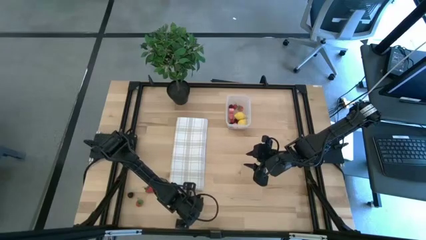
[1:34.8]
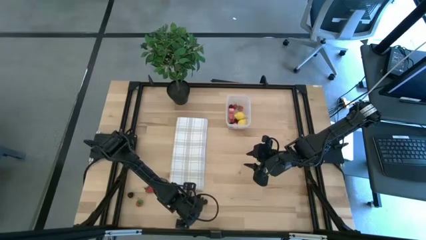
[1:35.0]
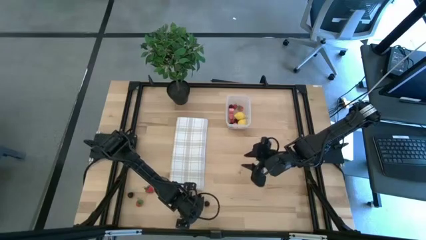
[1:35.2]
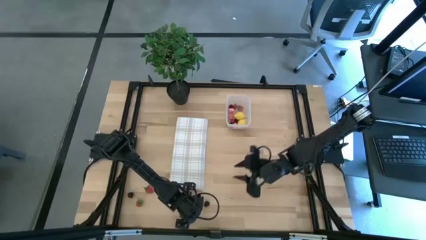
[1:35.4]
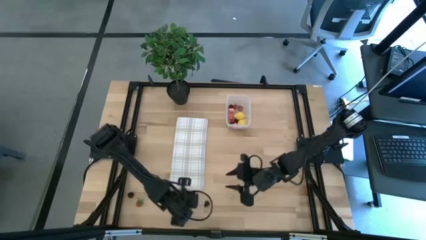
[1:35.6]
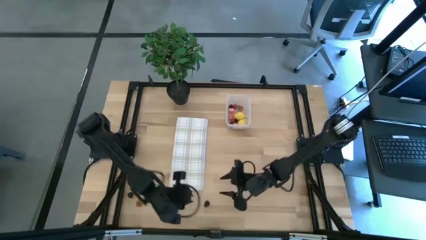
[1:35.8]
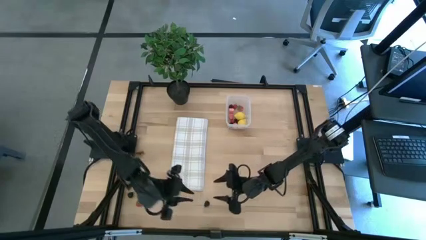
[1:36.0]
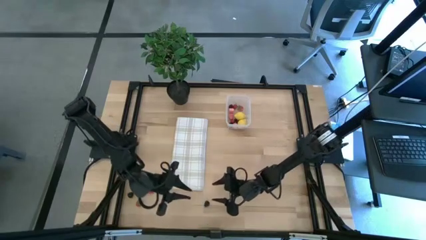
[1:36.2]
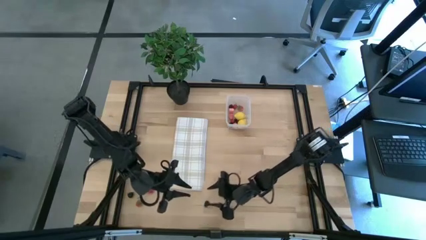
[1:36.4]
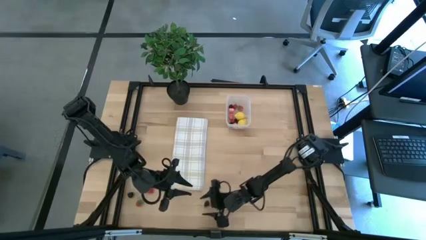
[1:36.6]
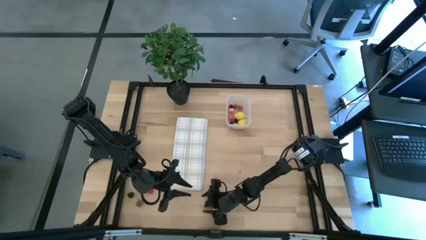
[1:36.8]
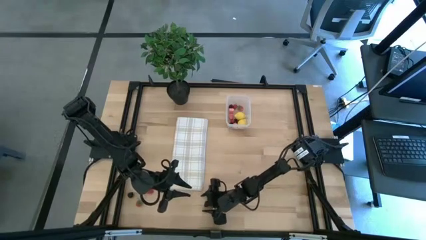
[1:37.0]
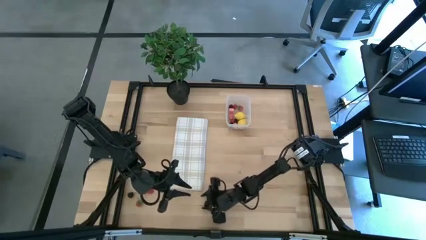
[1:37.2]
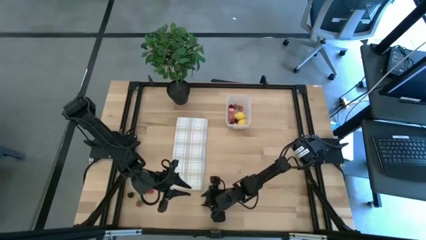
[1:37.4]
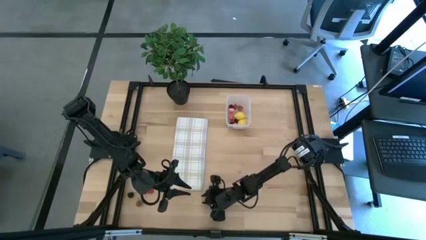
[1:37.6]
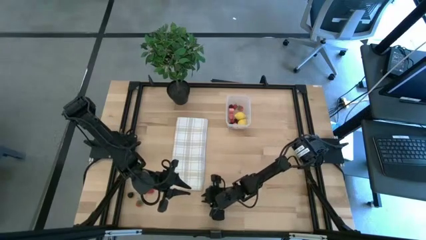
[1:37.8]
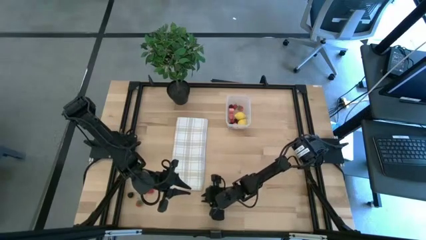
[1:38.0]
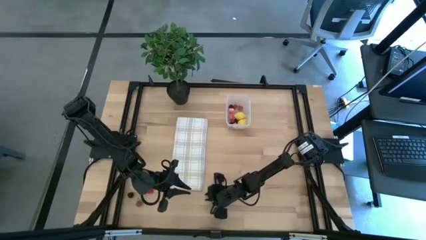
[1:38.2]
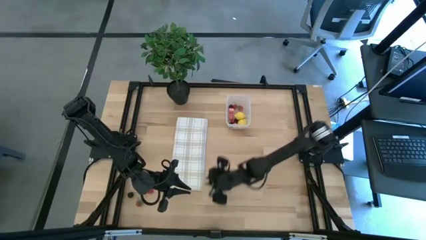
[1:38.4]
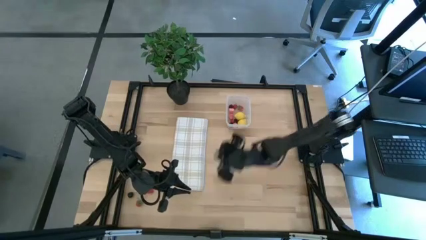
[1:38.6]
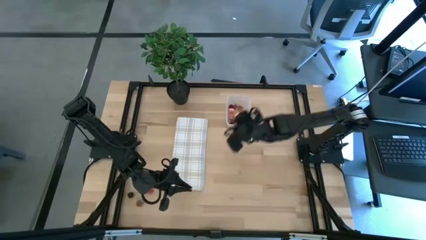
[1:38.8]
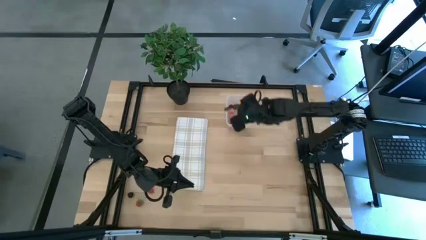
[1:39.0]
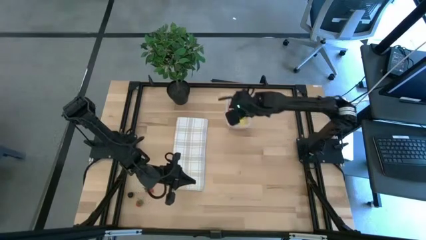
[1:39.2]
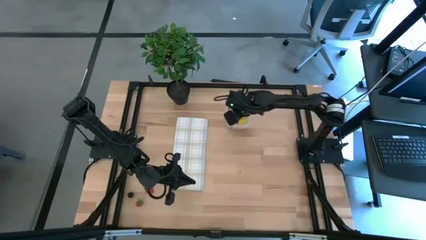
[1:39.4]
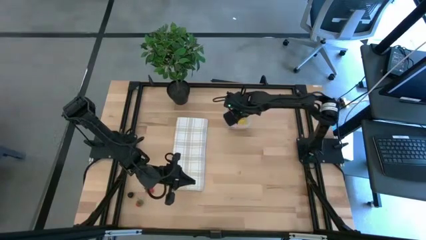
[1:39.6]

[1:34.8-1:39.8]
Task: Pick and placing Produce into tupperware
Put the blackberry into the transparent bin

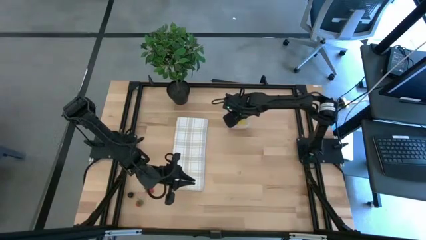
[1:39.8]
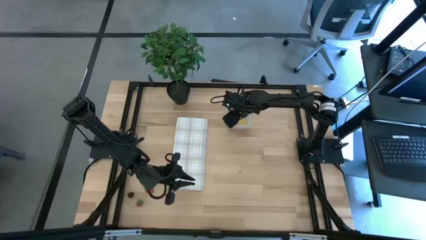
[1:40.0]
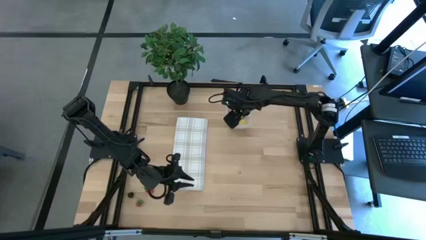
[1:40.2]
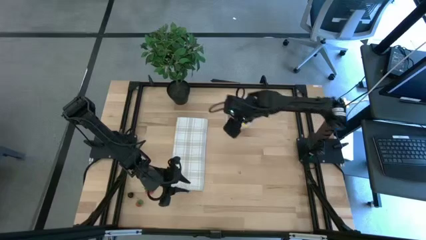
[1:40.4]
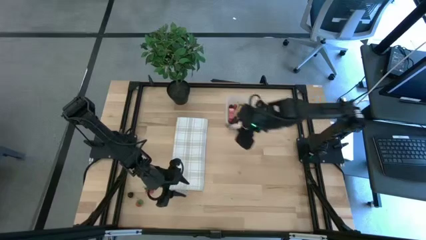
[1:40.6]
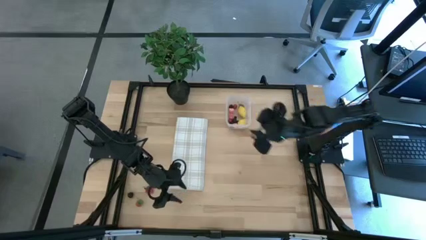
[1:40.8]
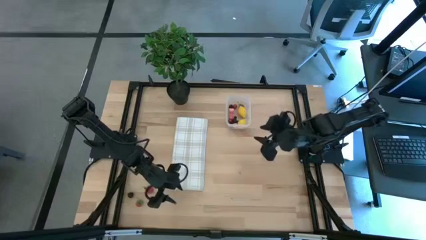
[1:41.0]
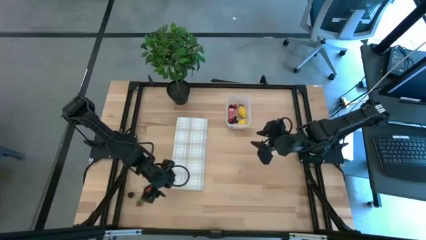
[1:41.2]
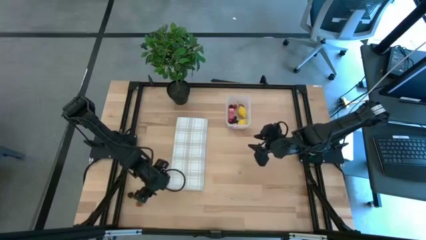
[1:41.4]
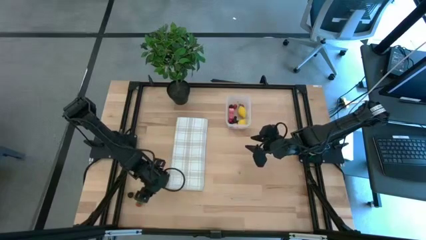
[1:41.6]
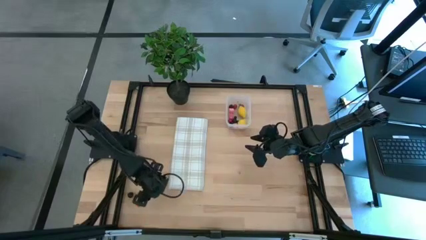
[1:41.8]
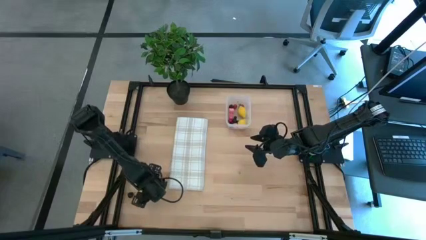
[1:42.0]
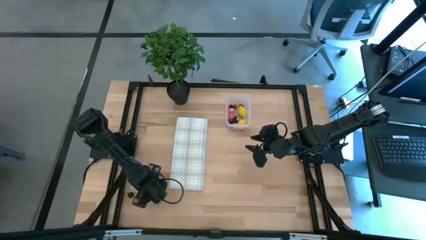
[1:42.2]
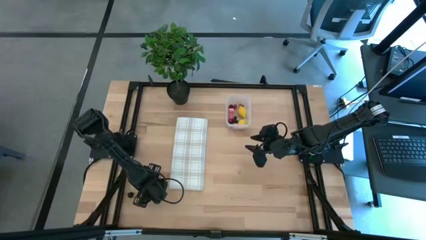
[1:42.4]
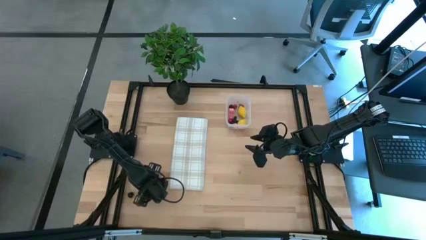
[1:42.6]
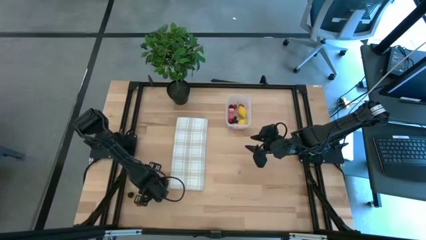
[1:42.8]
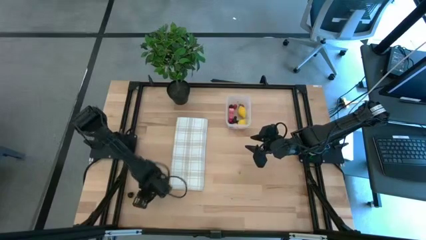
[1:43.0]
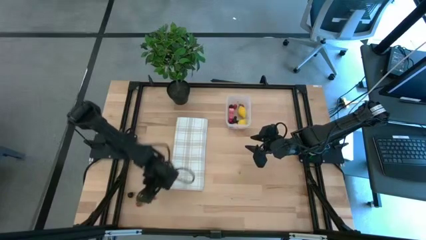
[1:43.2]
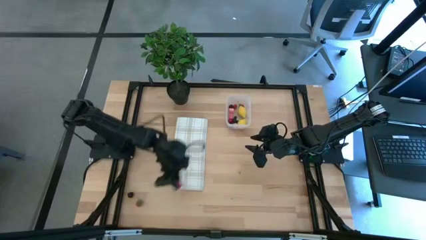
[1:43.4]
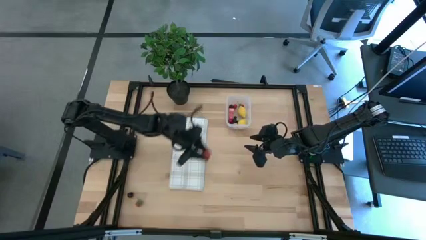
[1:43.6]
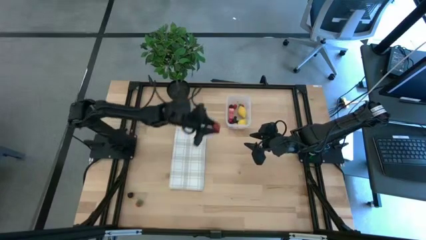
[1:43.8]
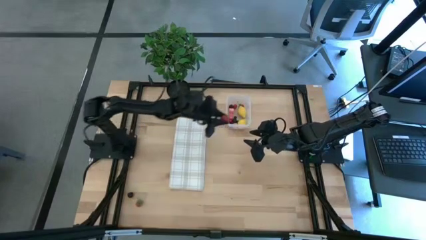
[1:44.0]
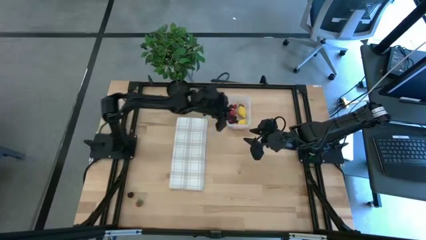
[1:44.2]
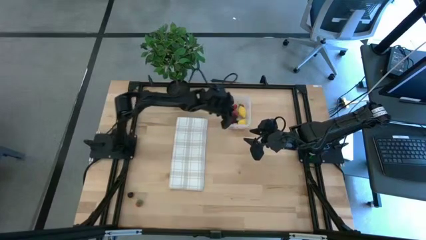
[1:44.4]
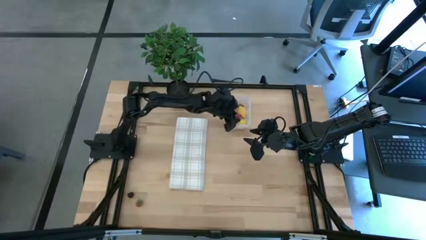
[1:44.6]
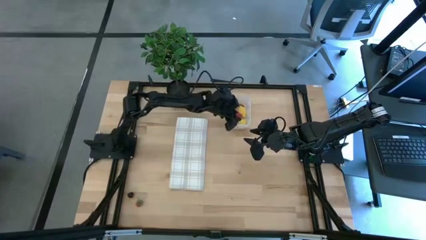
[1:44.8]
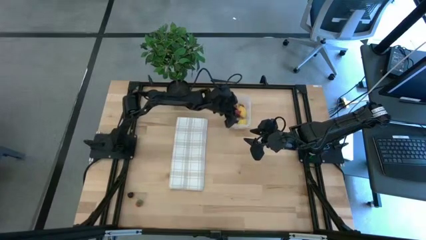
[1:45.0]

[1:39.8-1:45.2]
Put the right strawberry into the transparent bin

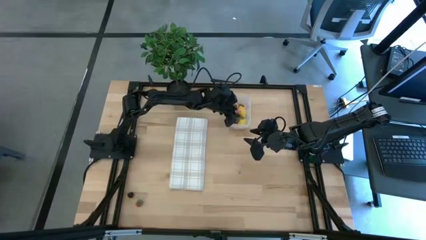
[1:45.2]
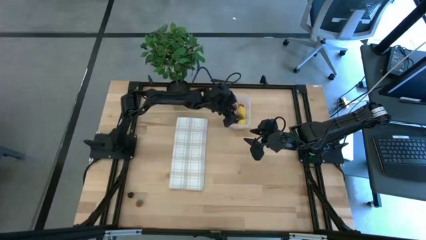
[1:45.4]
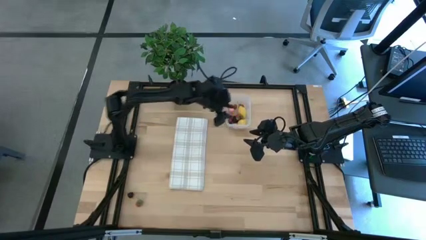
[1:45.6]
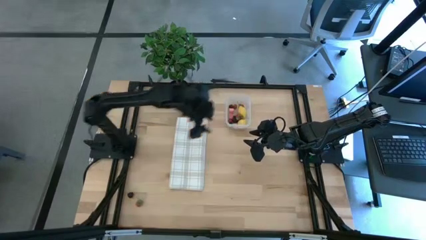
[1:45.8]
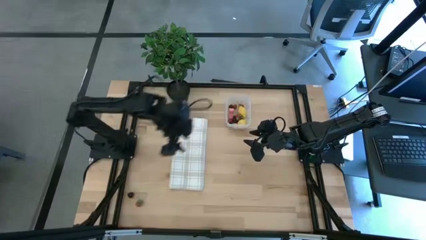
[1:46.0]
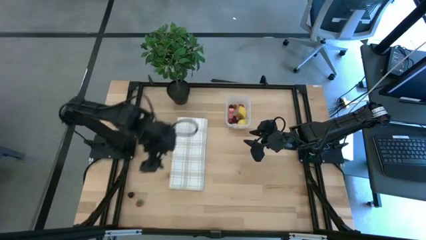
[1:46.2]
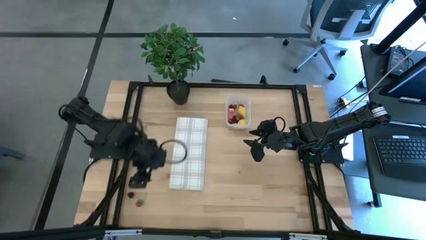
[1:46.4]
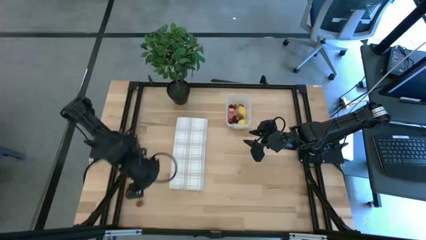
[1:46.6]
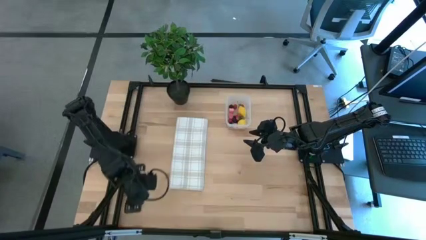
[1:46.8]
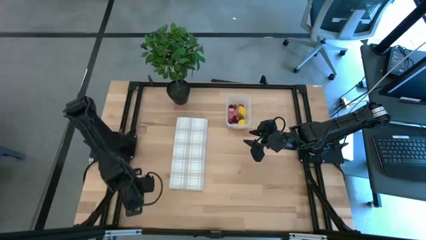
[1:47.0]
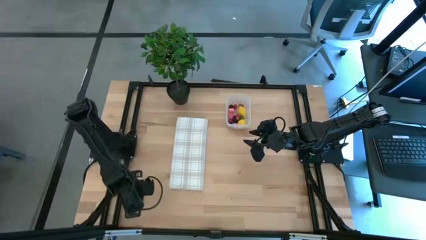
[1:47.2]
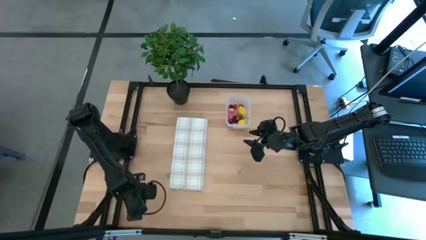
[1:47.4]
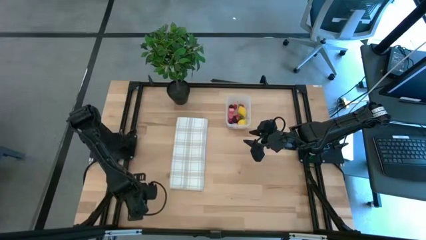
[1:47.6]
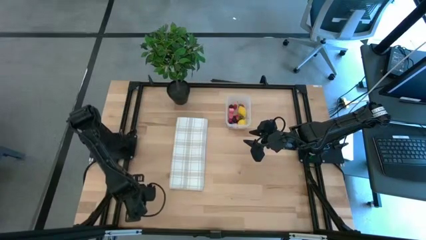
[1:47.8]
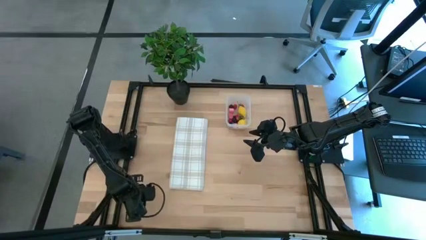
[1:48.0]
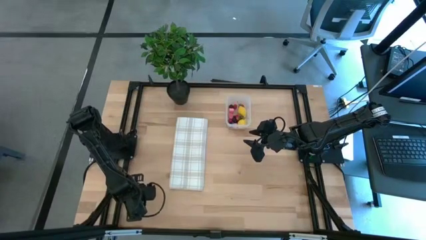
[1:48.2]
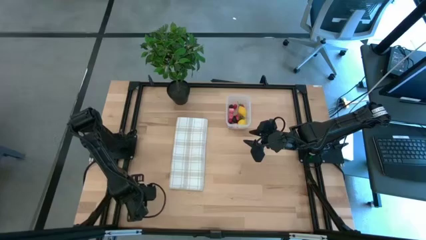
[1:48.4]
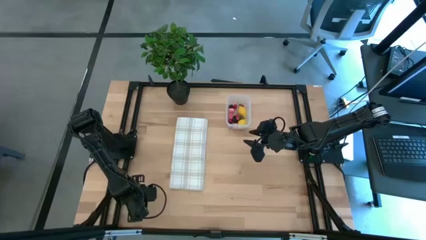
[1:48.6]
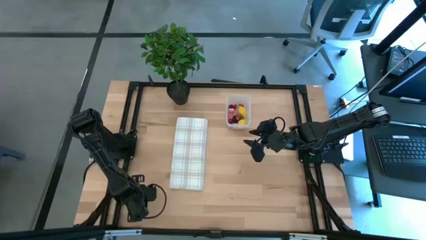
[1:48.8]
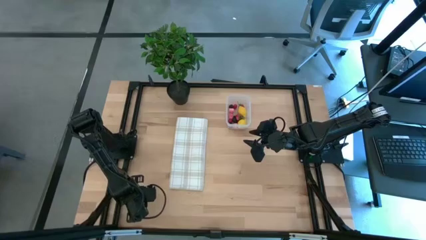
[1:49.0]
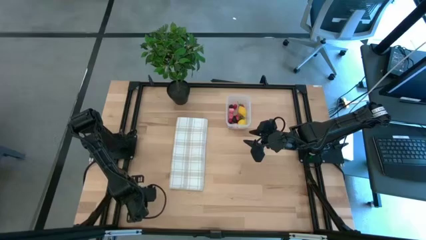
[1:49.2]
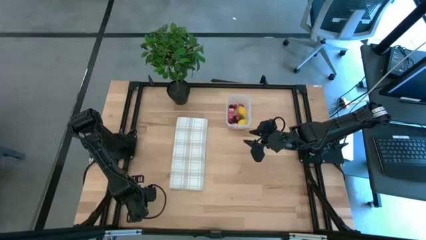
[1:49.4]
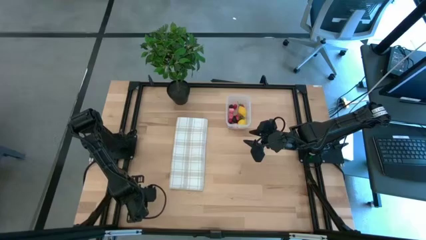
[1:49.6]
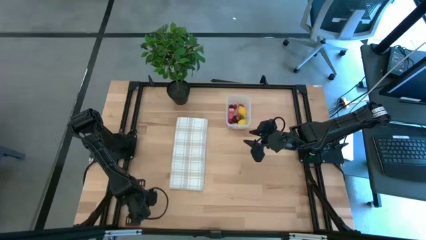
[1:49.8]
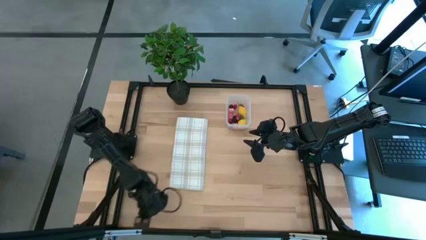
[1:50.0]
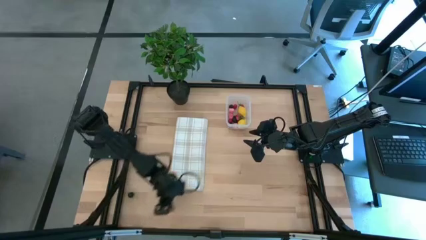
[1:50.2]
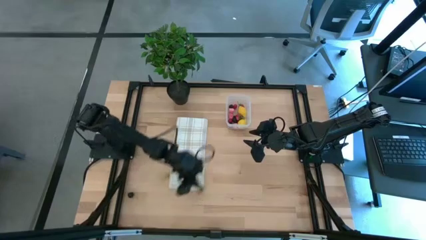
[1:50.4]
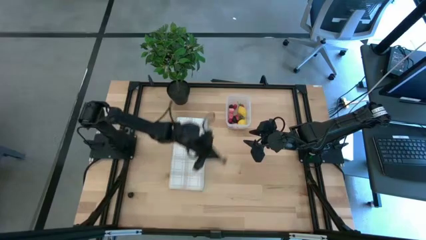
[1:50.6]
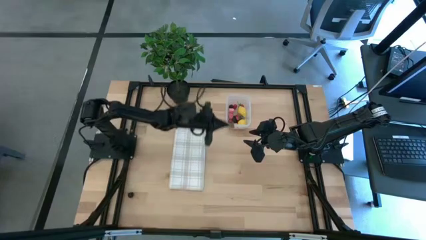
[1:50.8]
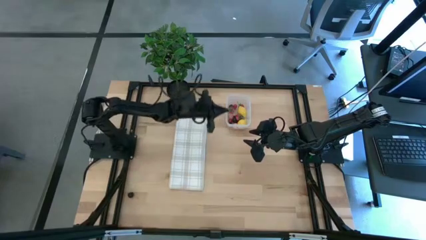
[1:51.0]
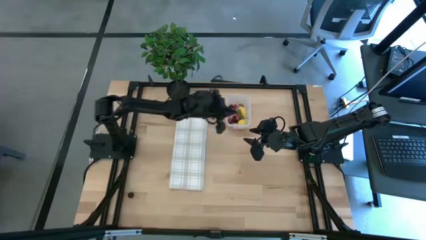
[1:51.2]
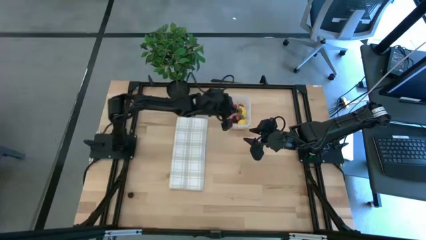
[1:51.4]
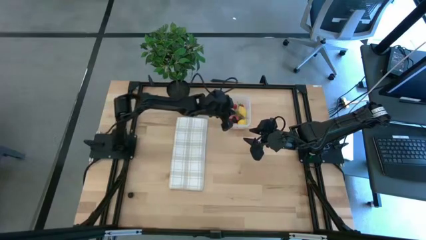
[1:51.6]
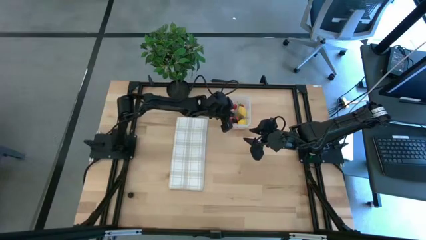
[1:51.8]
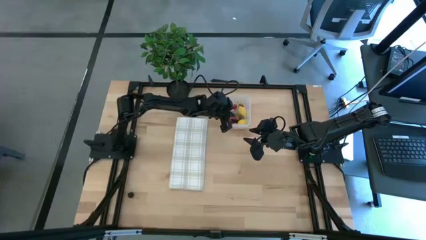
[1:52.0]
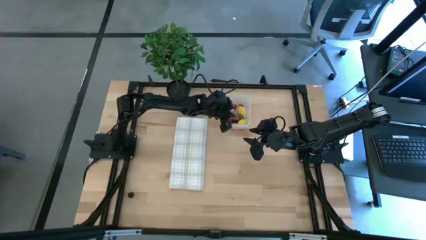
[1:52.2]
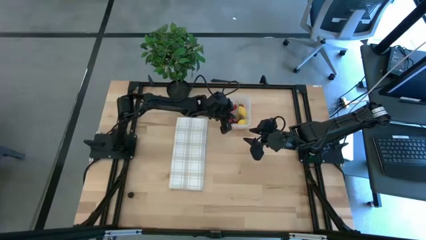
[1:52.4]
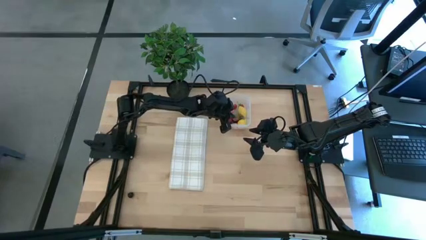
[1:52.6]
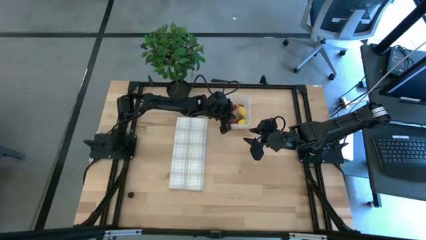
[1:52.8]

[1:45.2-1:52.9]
Put the strawberry into the transparent bin
